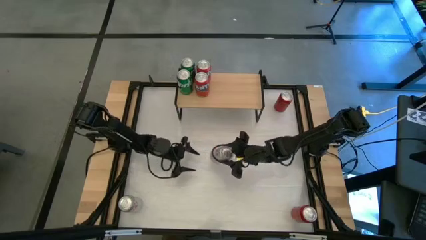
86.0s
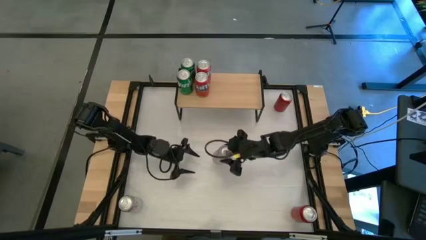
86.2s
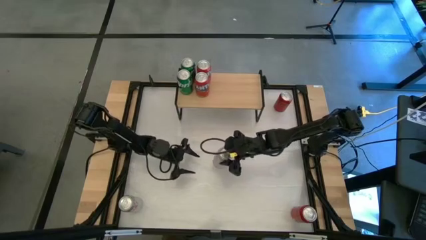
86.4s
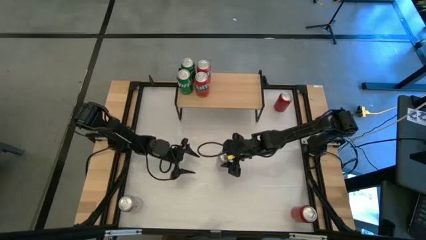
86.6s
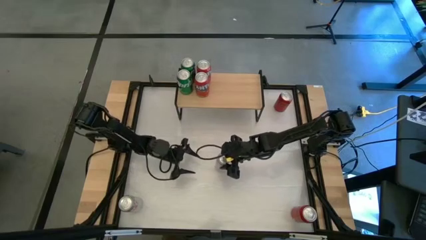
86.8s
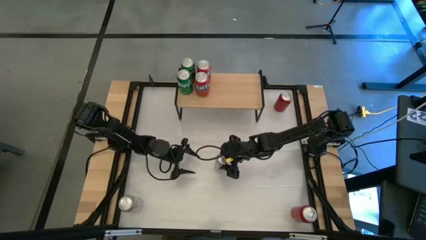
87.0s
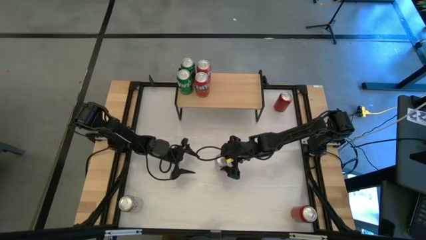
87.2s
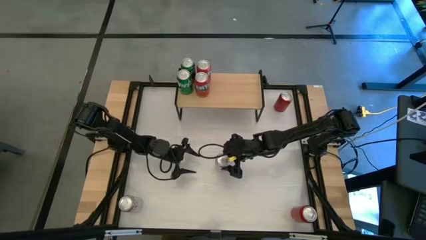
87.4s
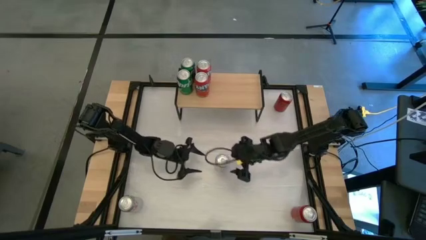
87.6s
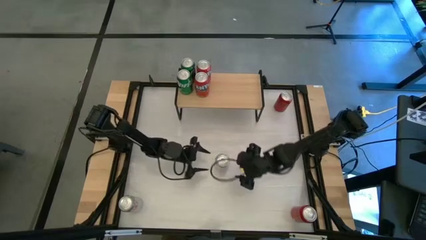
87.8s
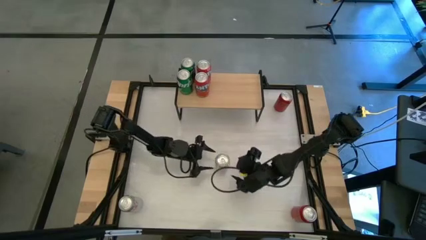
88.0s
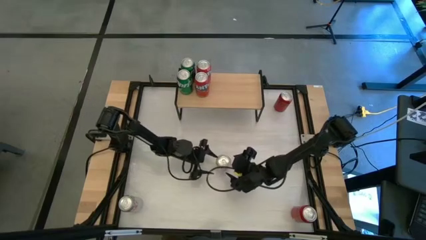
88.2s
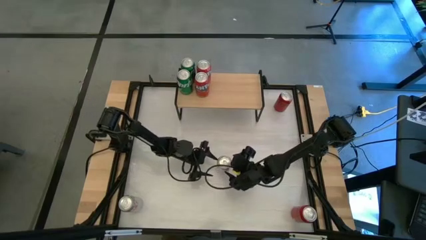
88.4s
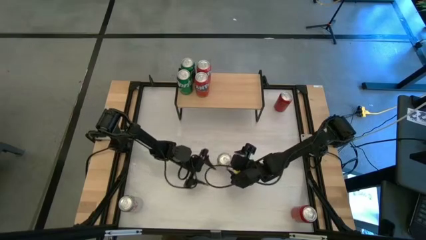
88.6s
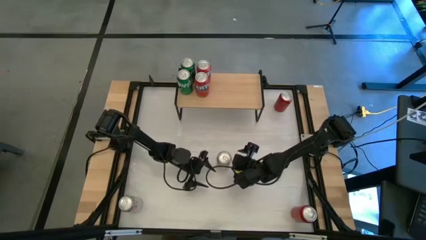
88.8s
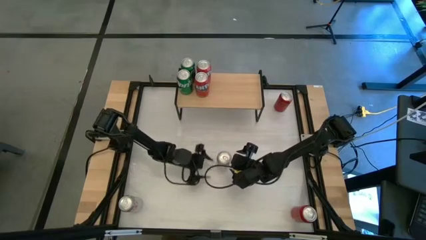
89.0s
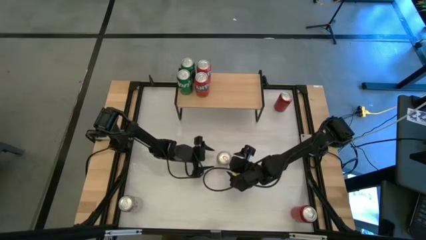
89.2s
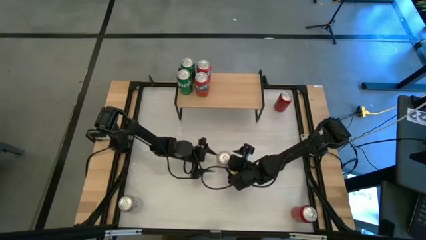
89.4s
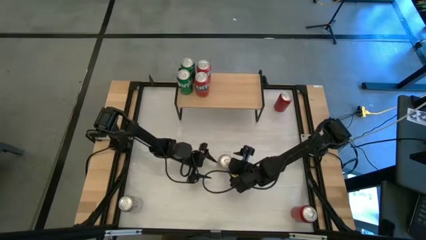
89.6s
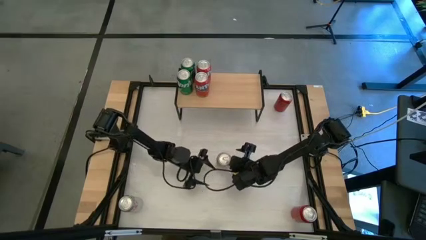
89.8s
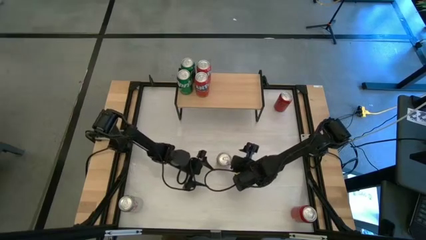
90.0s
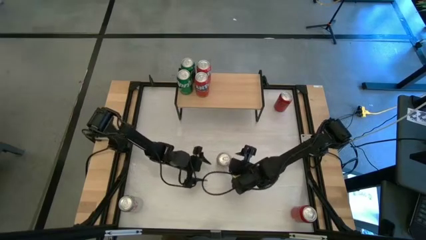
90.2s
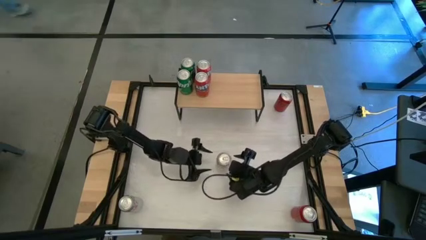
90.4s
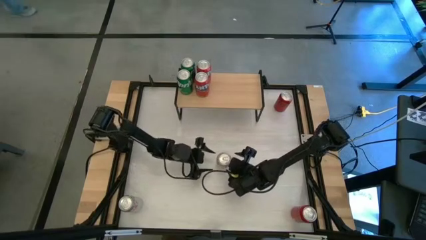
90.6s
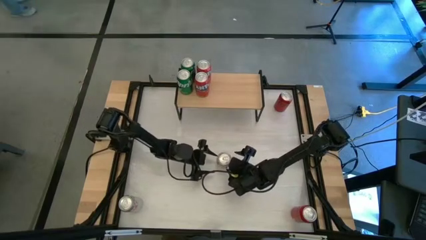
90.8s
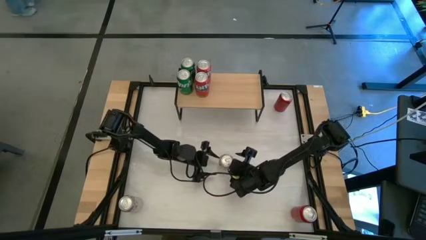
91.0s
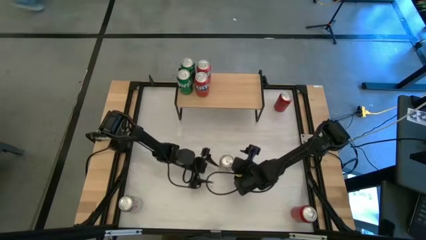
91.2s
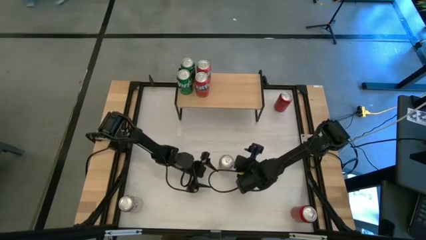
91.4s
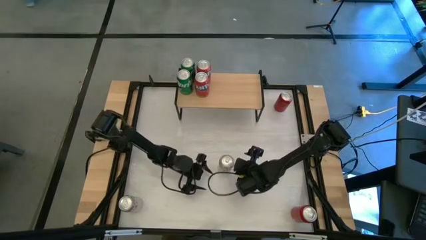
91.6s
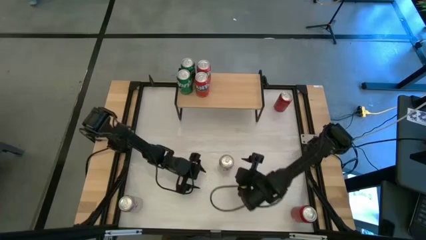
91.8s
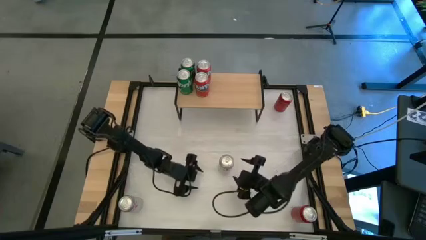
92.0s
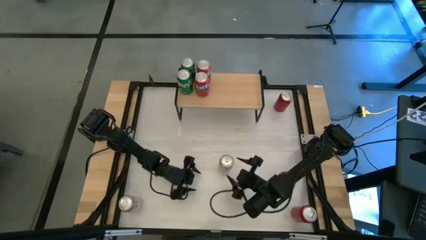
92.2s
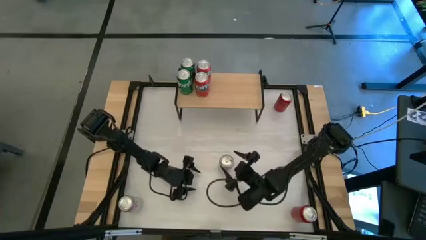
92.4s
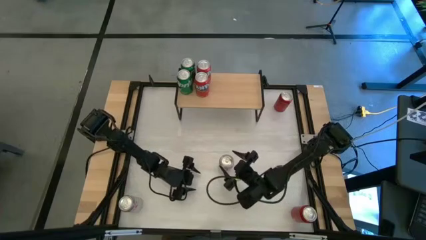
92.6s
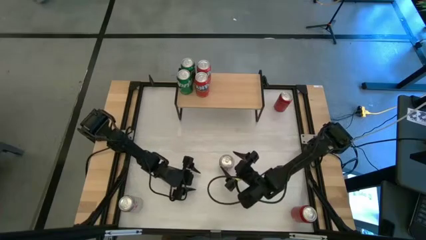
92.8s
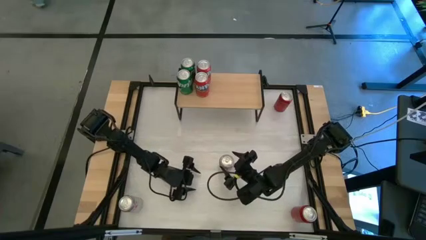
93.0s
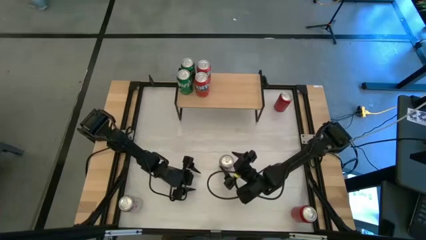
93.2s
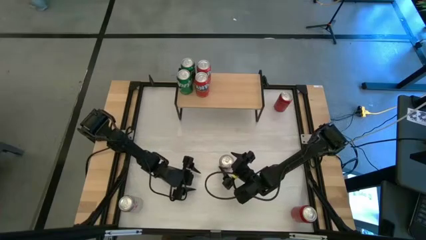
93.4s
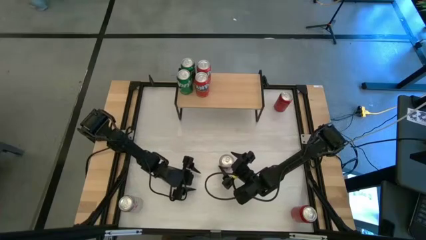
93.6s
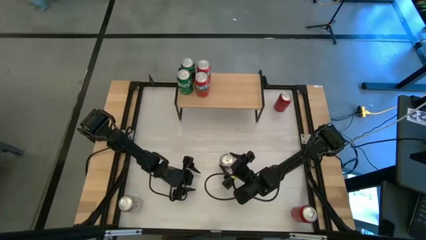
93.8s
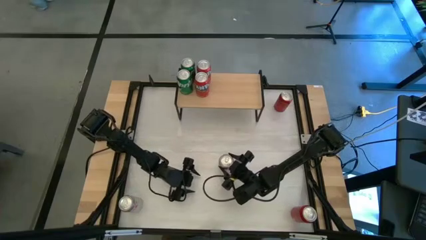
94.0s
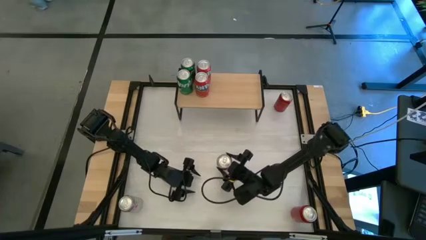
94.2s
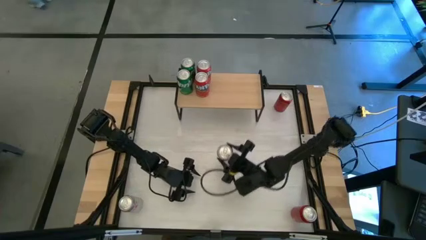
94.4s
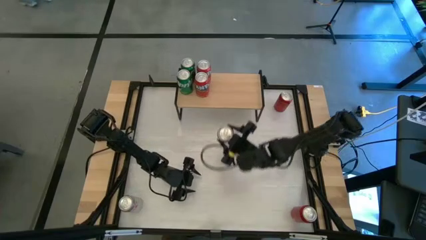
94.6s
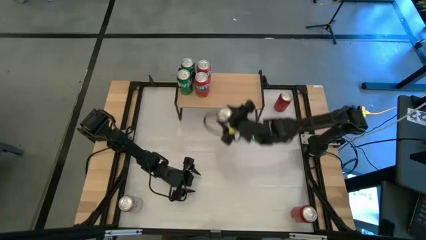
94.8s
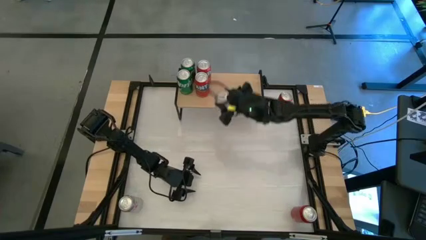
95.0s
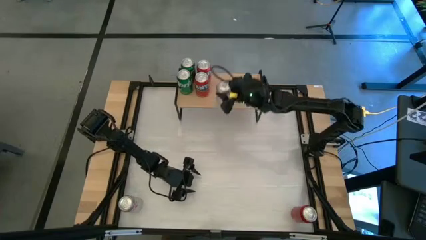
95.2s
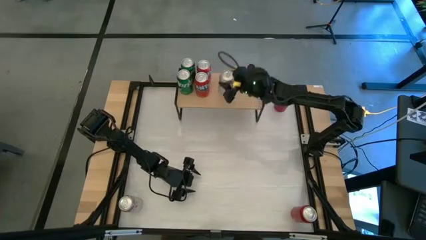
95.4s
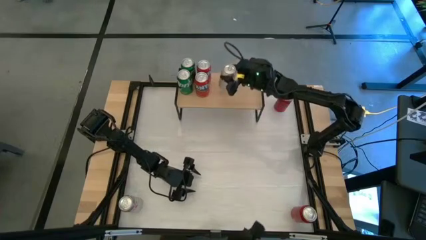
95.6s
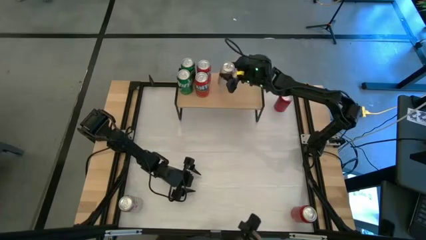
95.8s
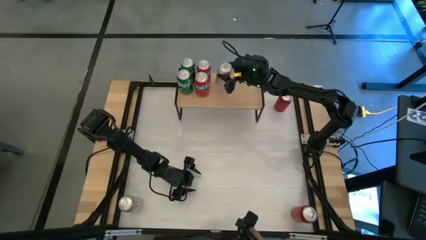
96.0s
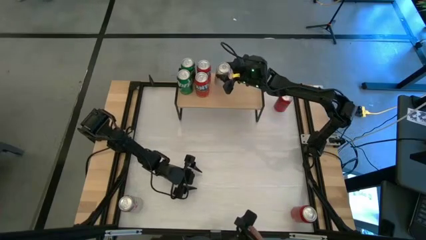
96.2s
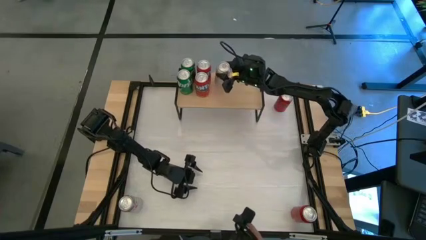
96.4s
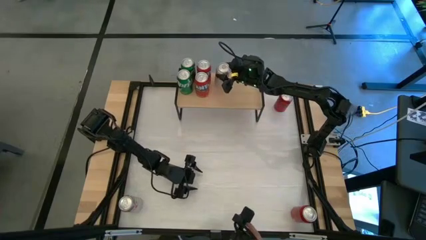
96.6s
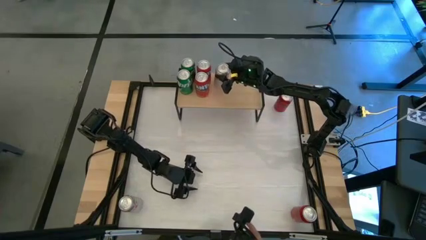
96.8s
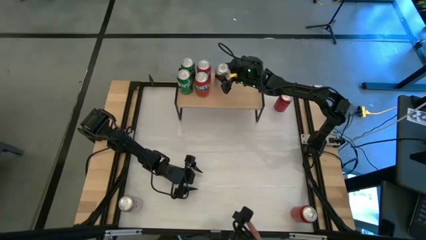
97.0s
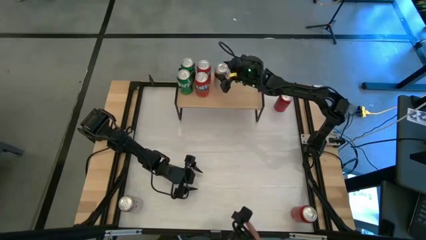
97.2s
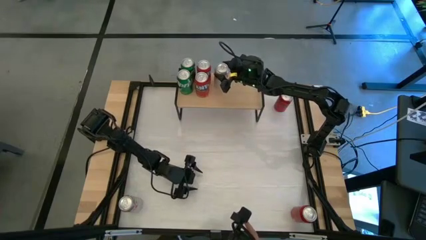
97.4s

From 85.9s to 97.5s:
Task: Place canned beverage on shelf
Put the right white soda can on the shelf

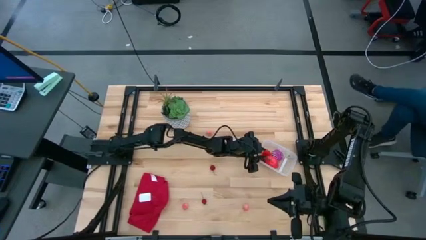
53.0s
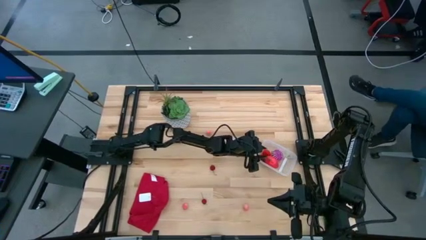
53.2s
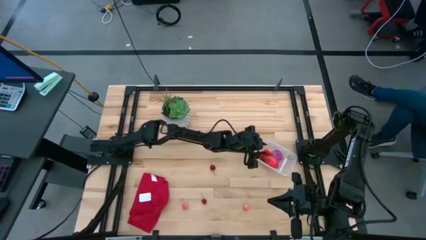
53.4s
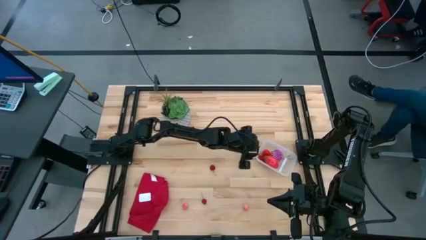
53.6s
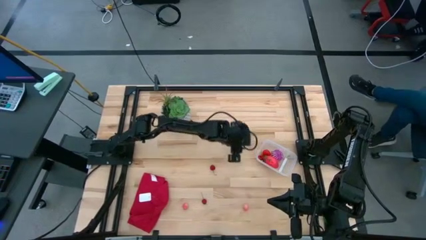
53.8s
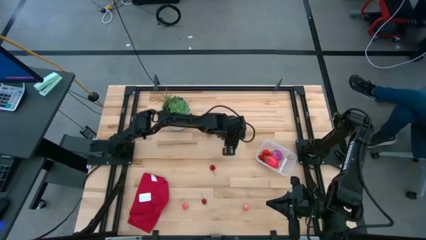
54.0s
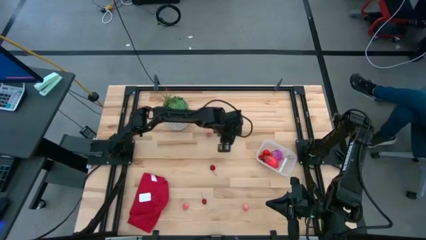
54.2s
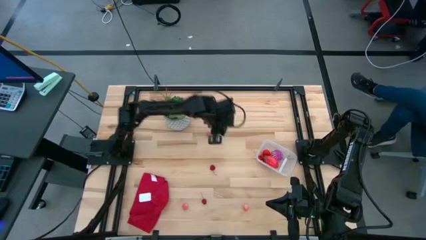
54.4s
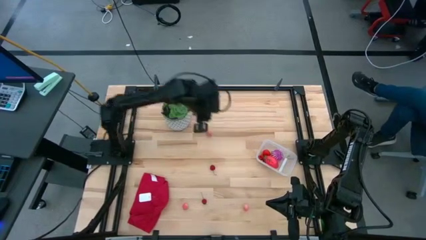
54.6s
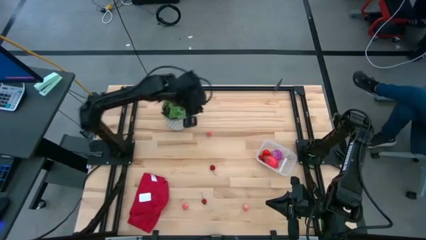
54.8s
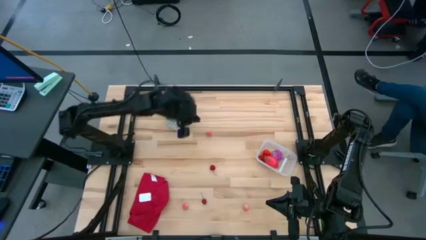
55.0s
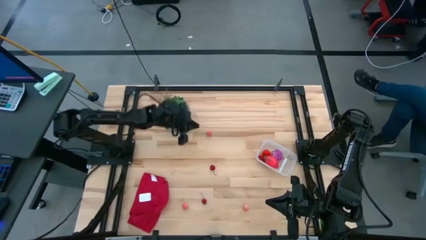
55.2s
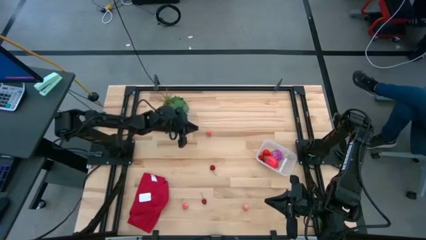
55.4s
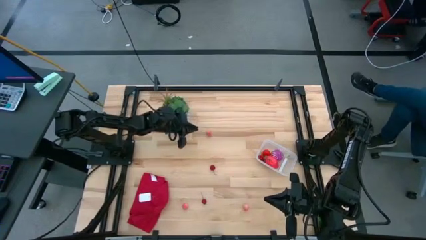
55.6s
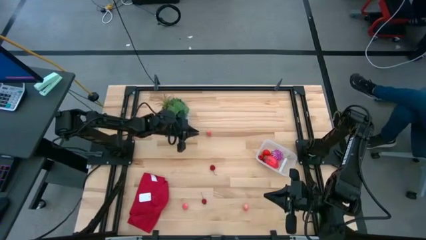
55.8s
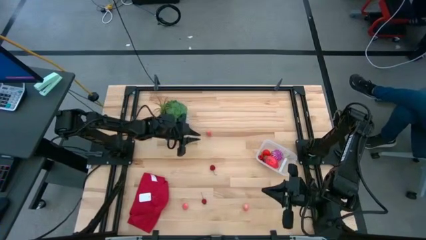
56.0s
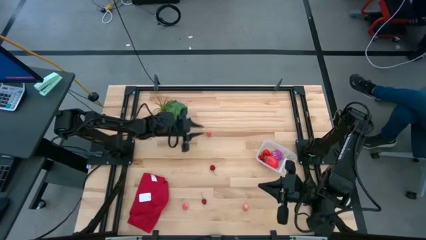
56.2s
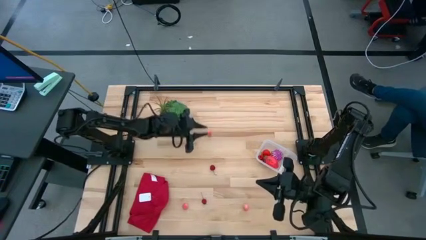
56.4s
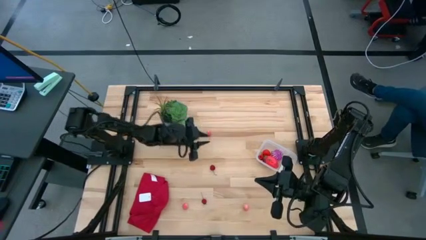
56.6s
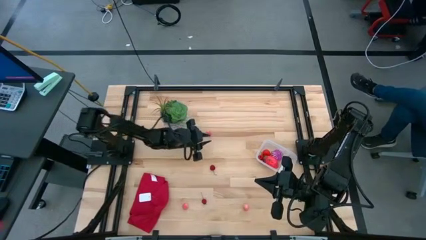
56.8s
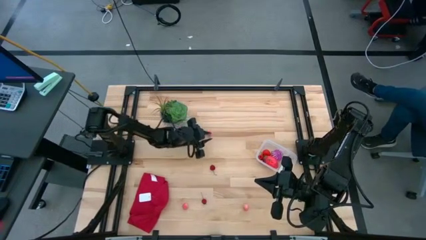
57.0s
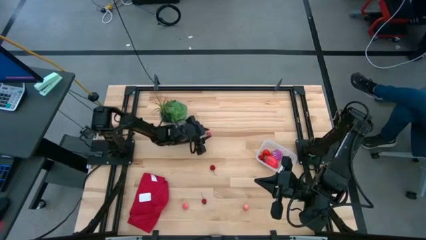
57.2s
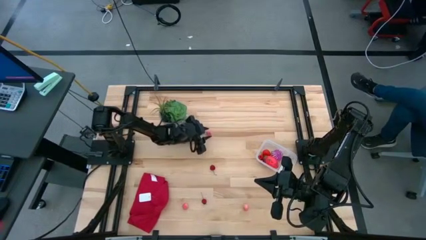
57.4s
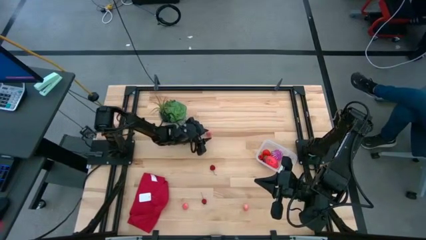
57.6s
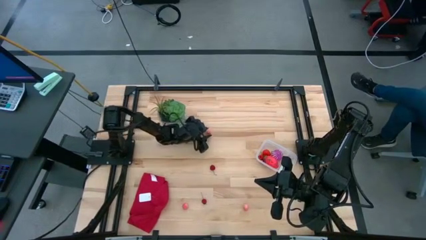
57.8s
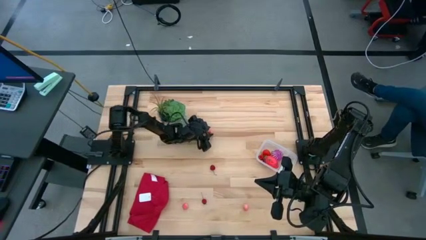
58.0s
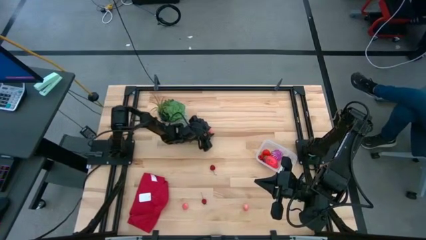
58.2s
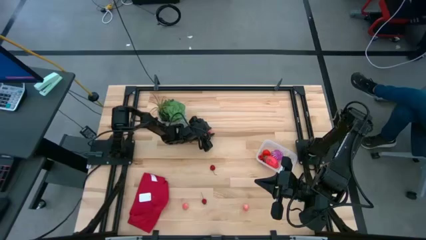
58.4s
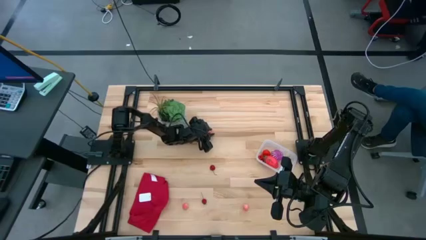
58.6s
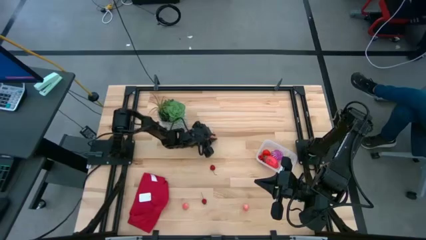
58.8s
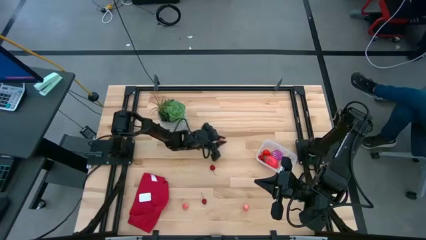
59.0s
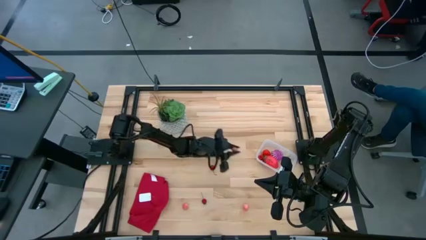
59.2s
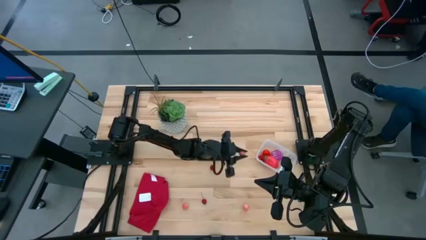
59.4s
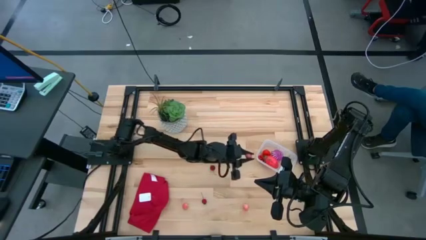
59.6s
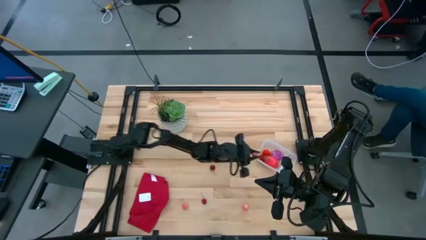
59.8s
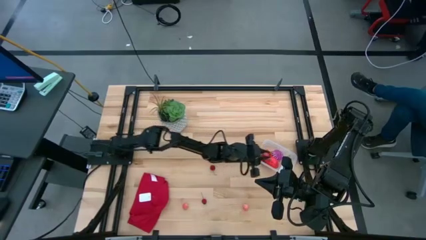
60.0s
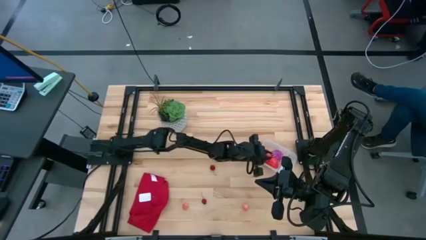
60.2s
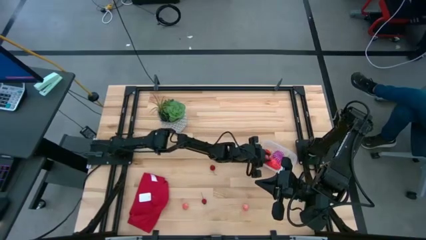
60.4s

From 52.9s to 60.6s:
Task: Pick and placing Produce into tupperware
Put the top pink peach into the transparent bin
